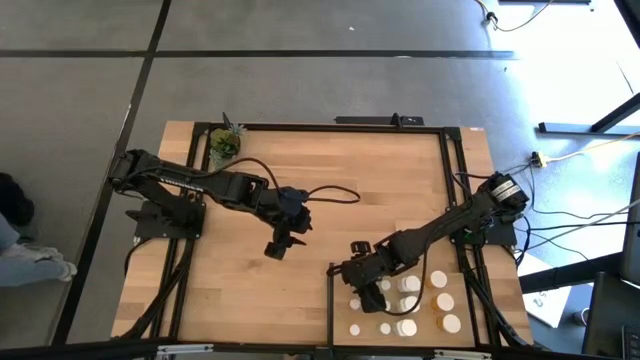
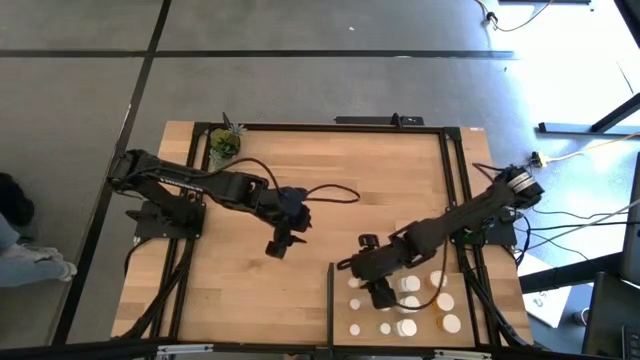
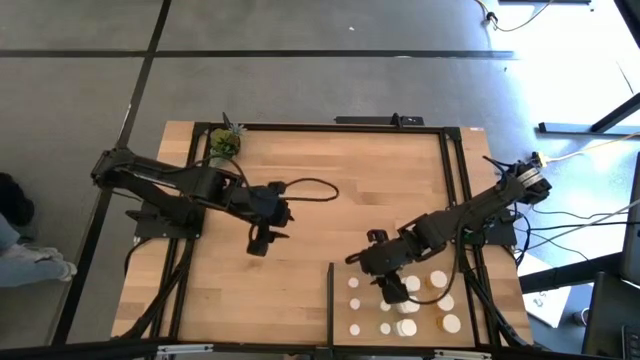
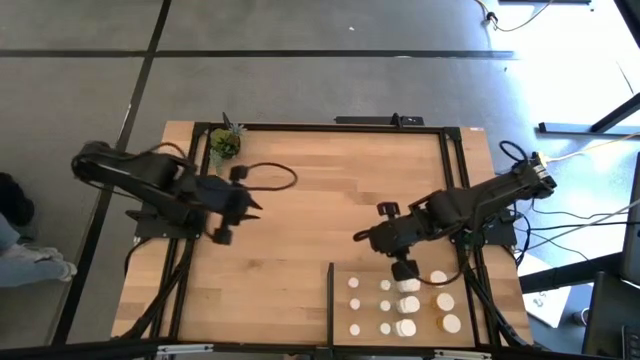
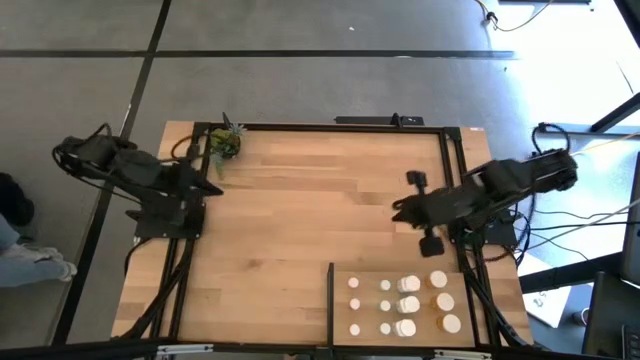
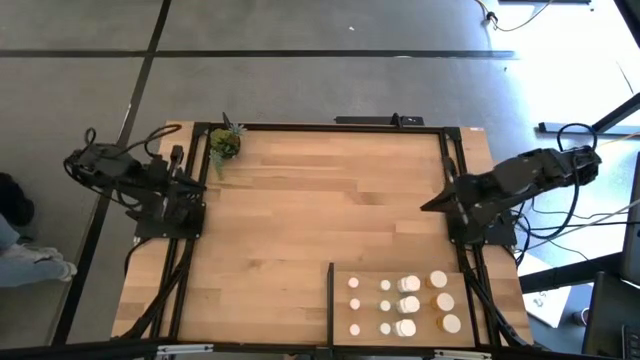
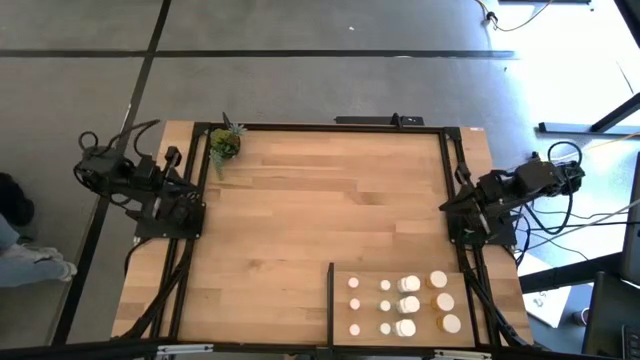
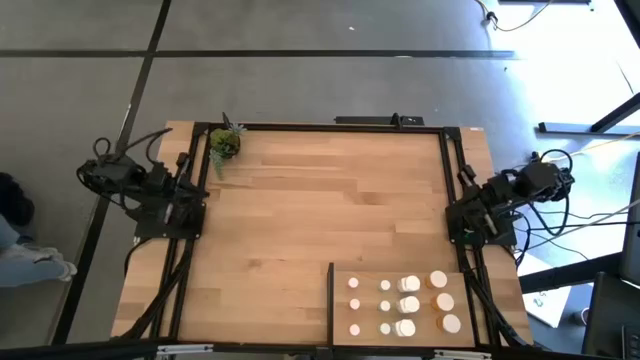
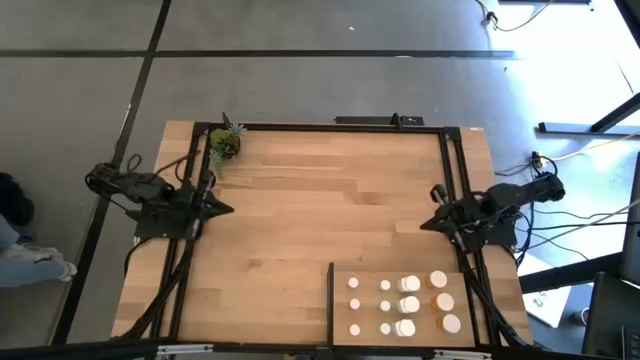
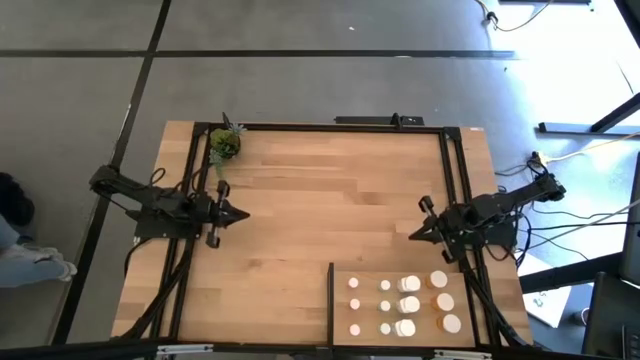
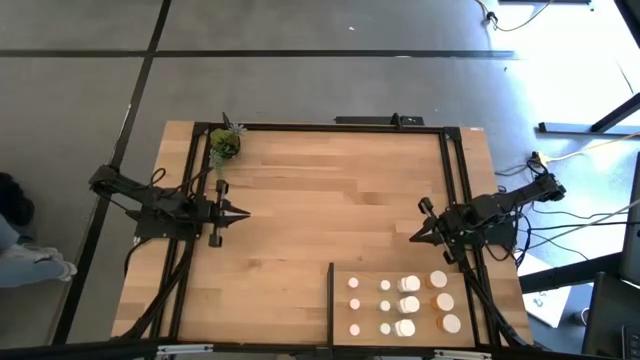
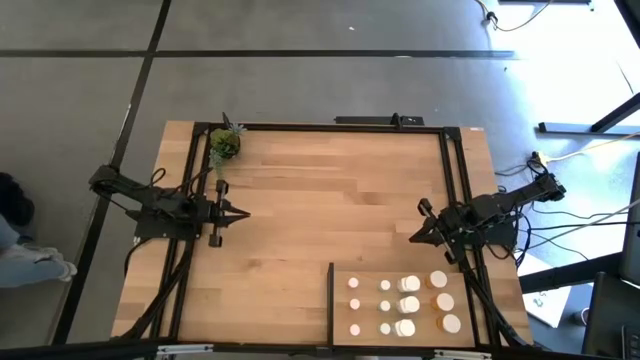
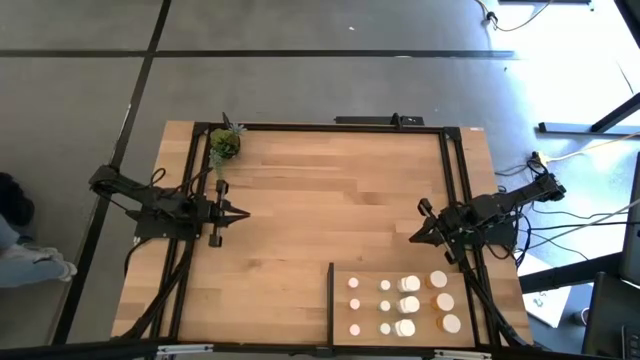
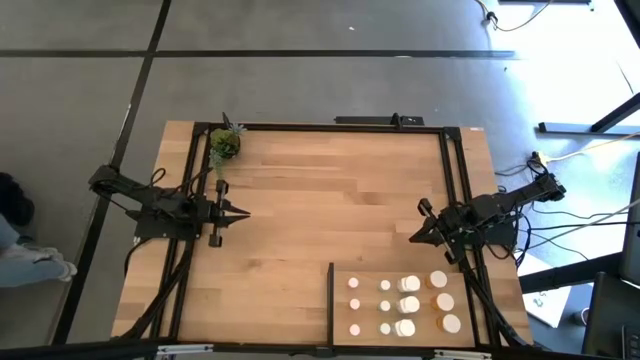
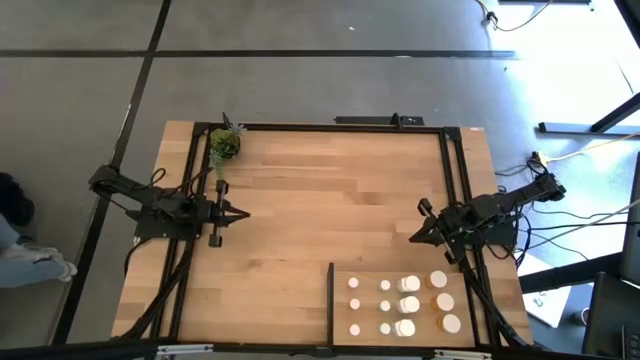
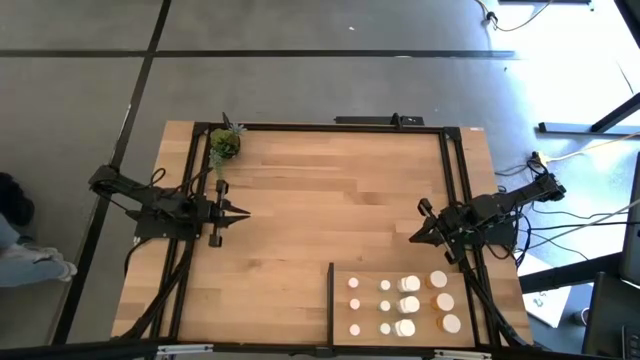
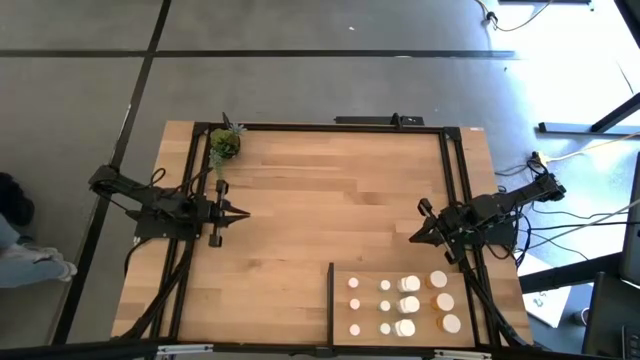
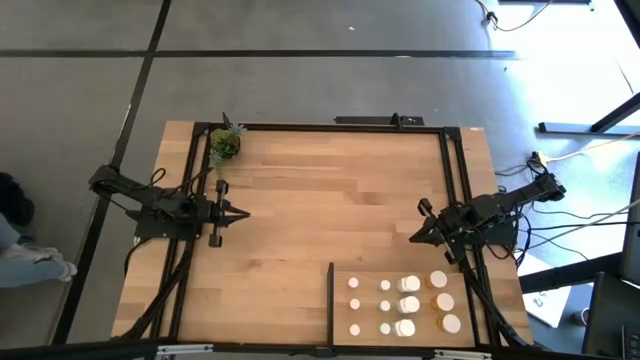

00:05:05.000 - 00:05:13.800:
Task: Pick and place medicine bottles onto shelf by color
Return to Home Position

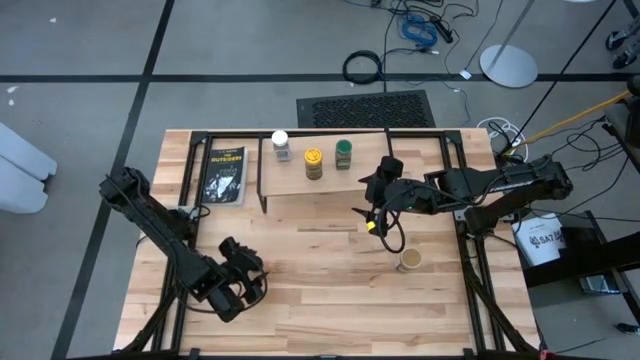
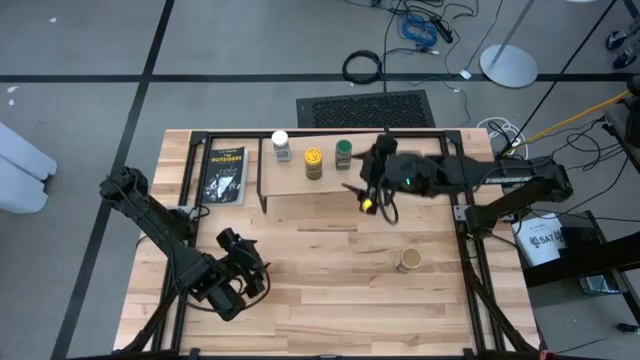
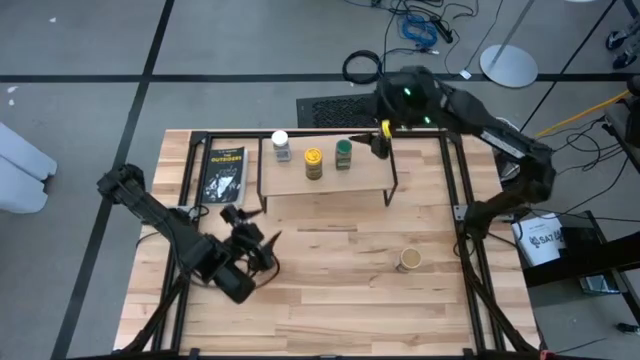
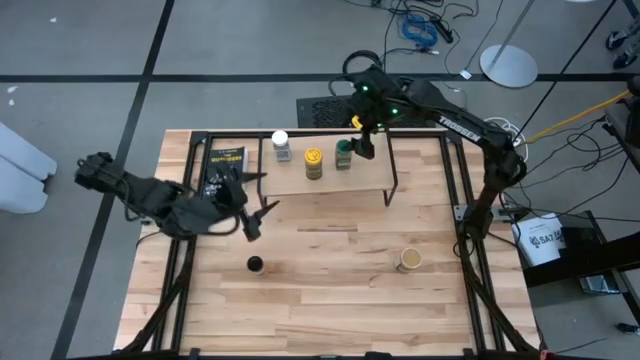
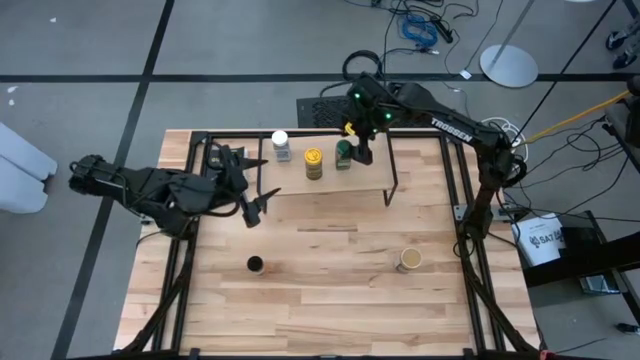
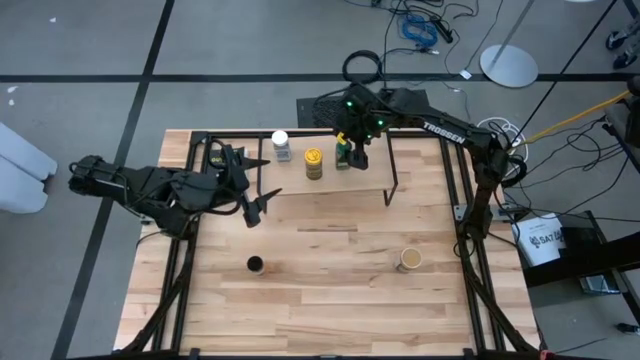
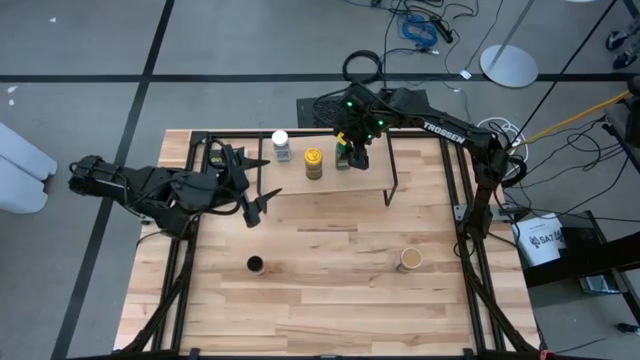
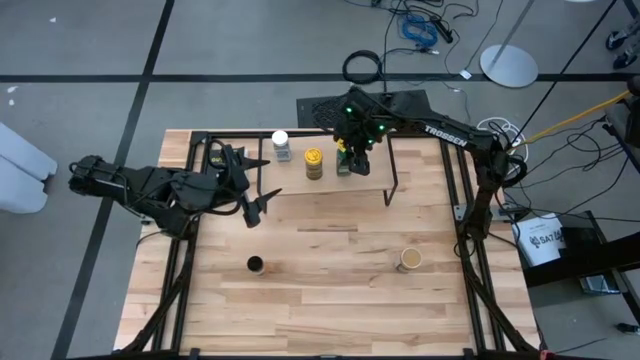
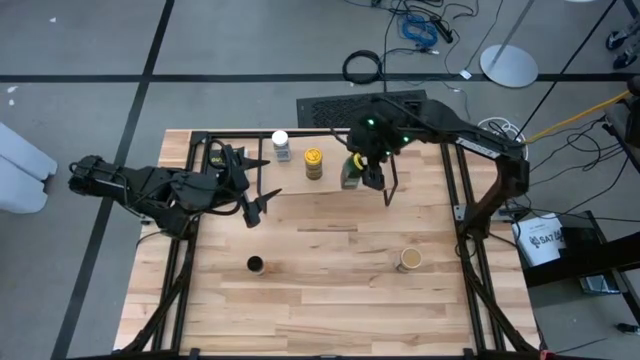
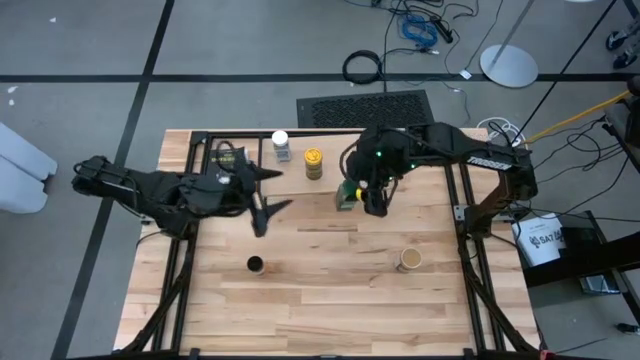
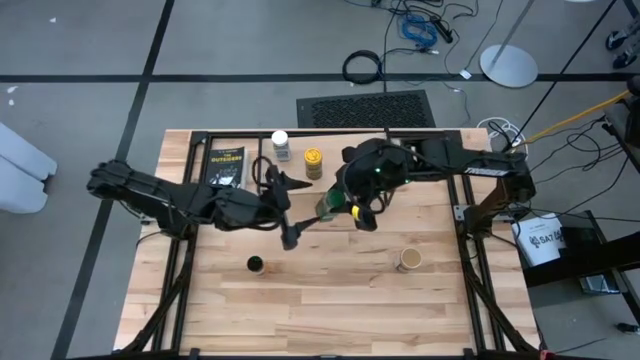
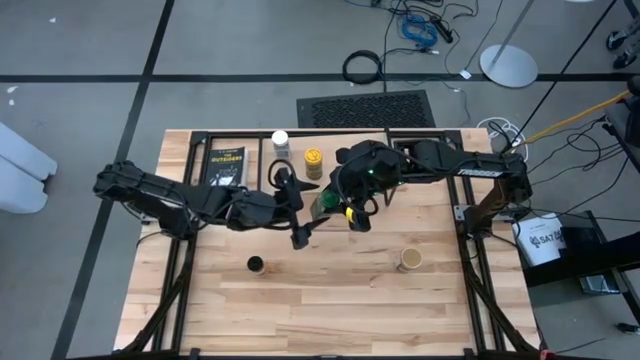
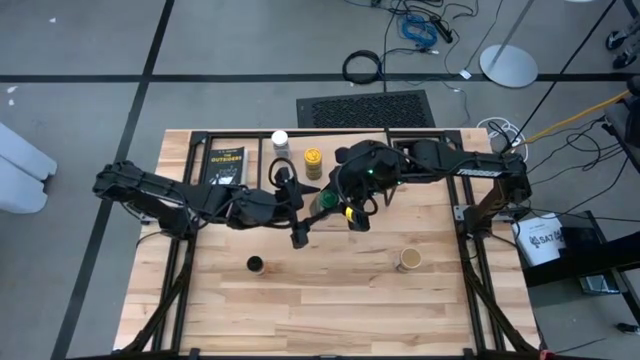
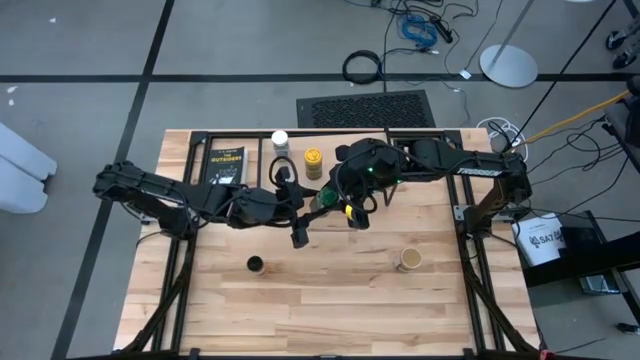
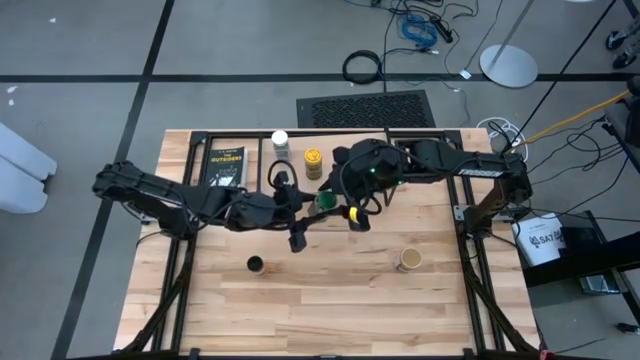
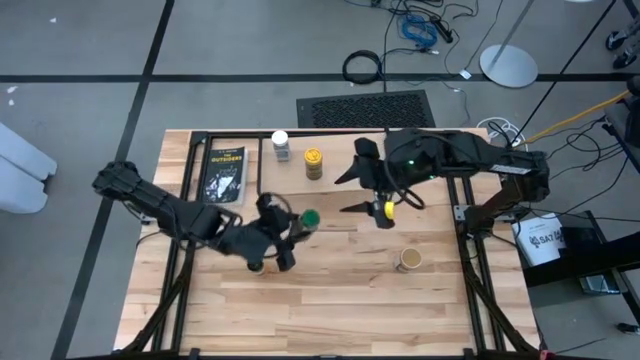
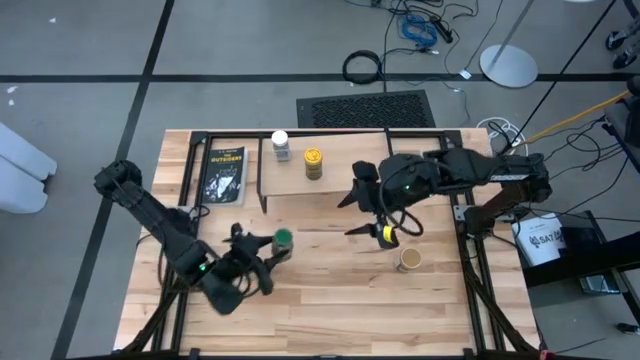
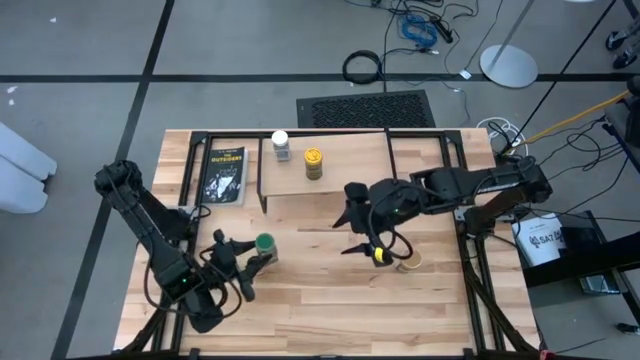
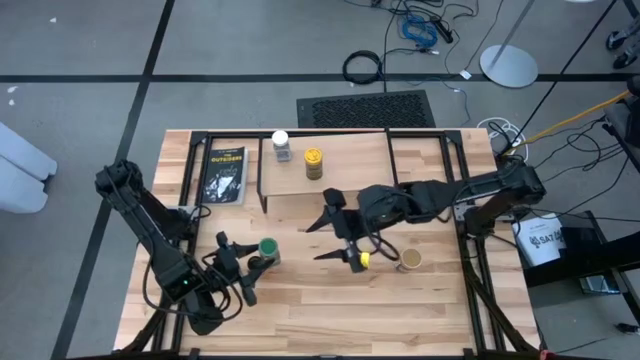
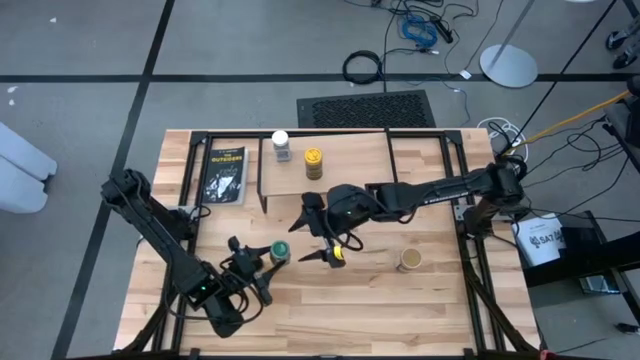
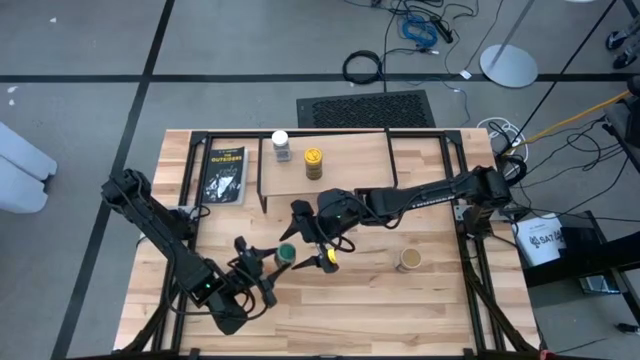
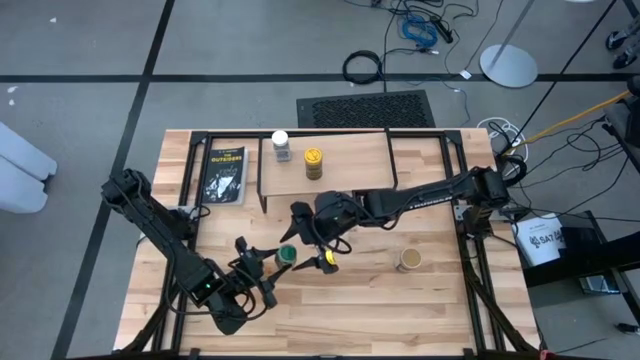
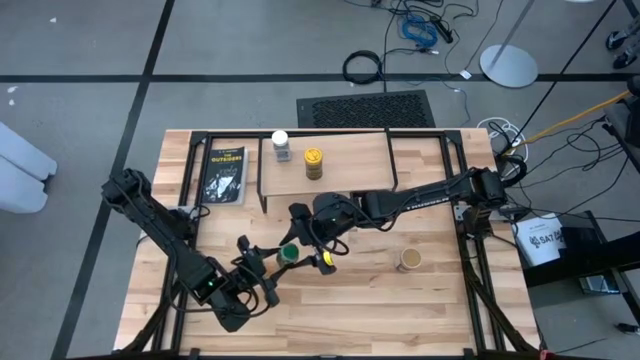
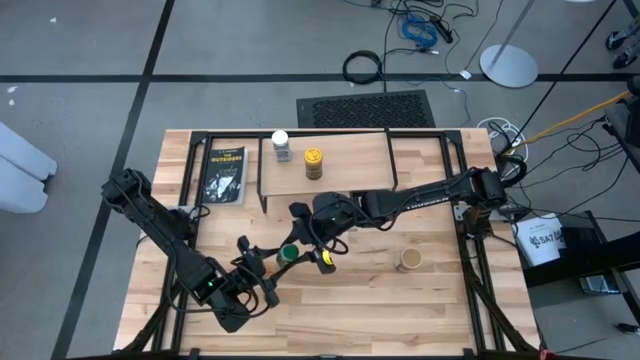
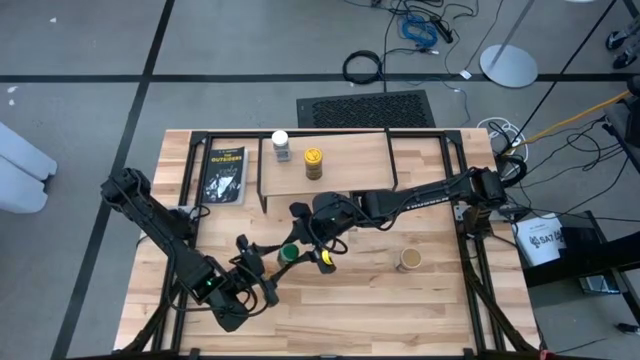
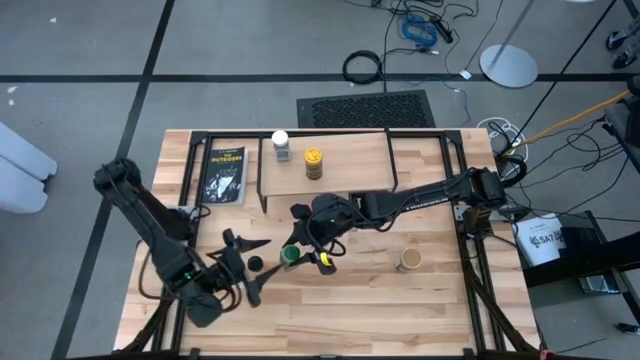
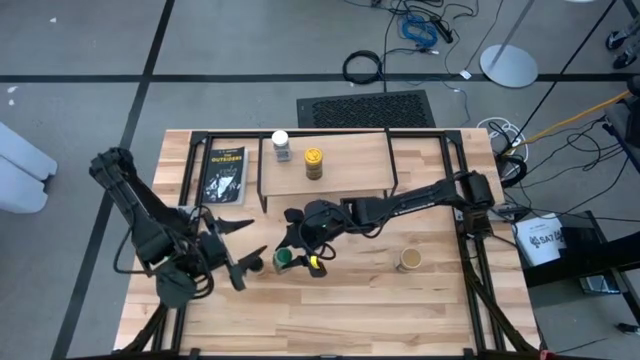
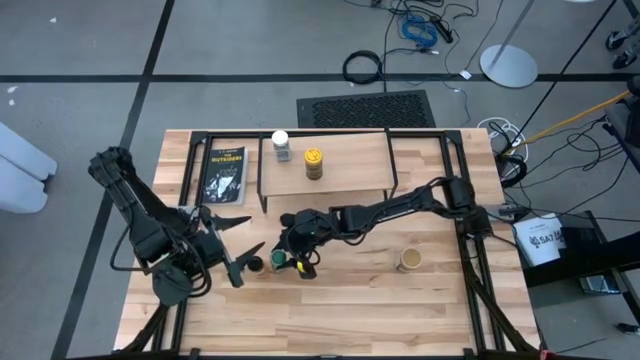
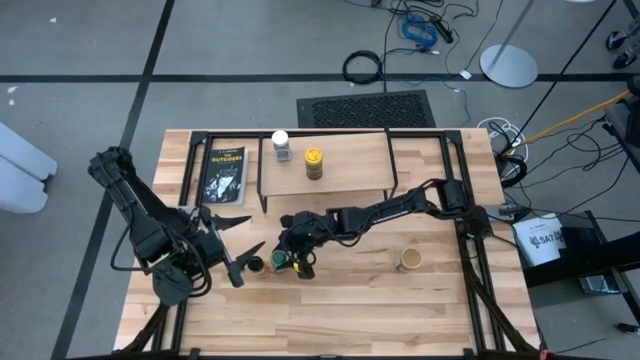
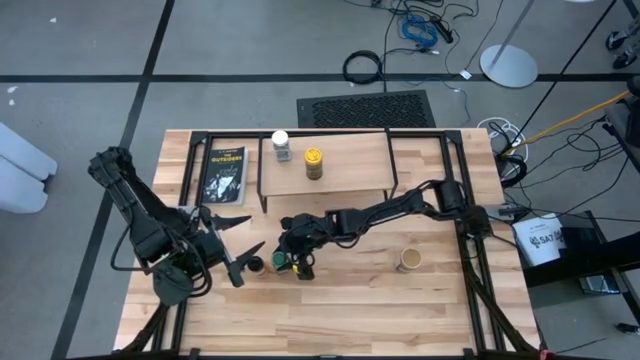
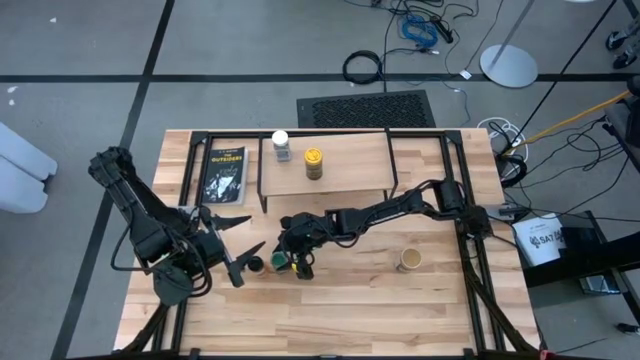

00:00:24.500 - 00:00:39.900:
Task: Shelf spices
Remove the green seasoning bottle from the shelf
